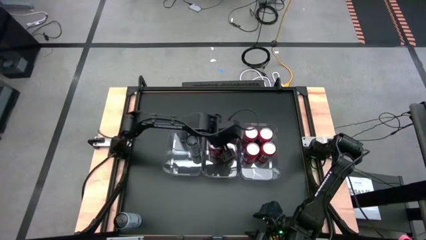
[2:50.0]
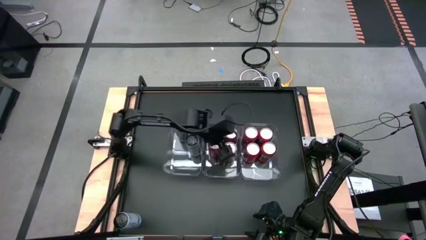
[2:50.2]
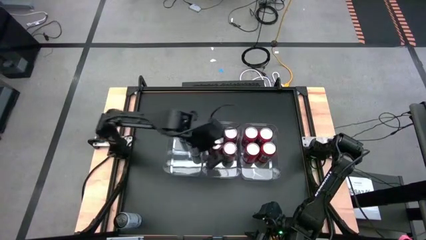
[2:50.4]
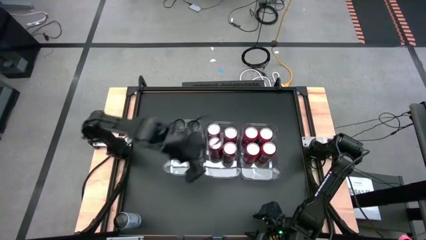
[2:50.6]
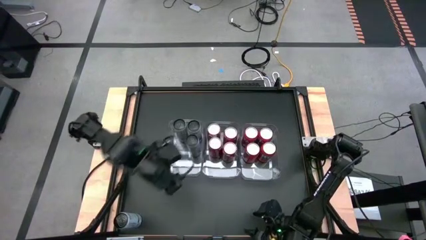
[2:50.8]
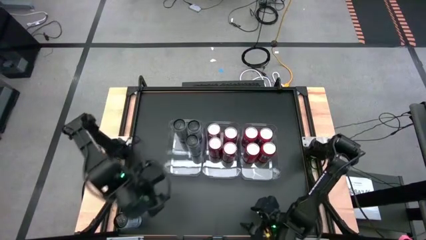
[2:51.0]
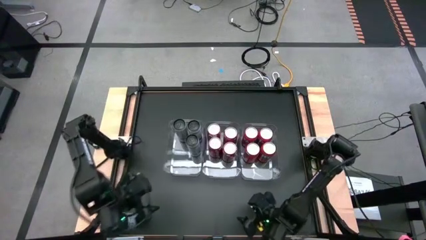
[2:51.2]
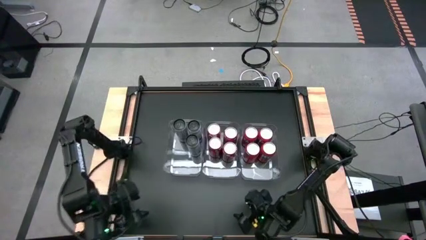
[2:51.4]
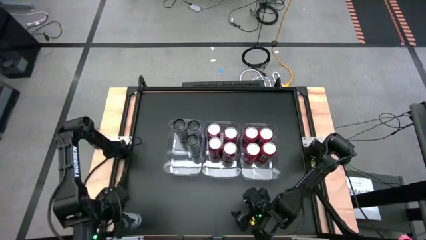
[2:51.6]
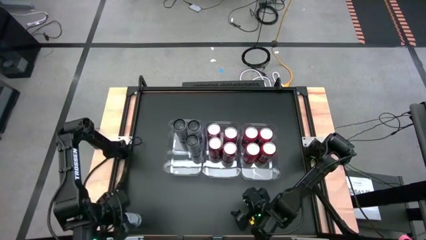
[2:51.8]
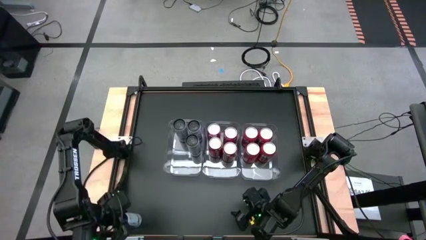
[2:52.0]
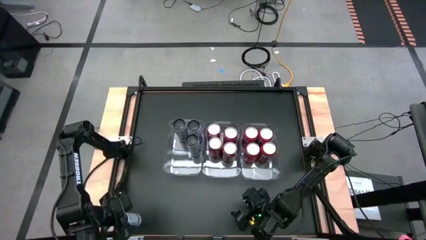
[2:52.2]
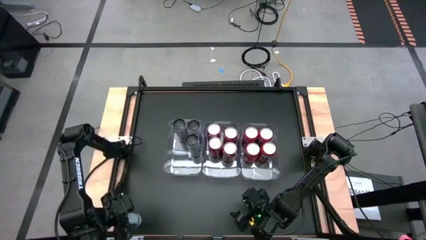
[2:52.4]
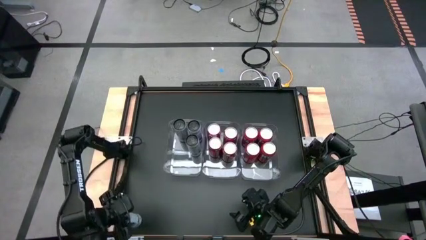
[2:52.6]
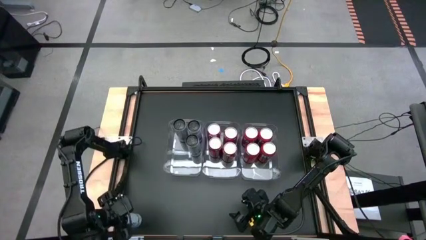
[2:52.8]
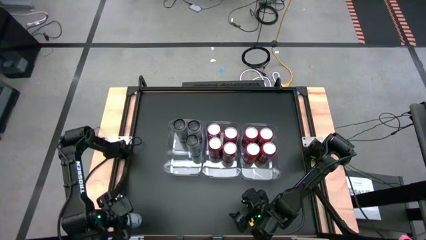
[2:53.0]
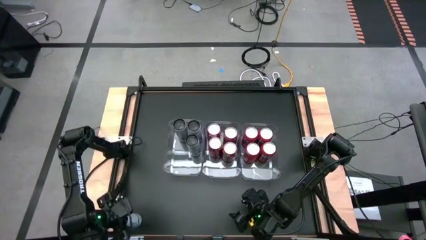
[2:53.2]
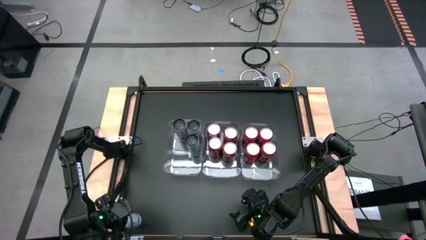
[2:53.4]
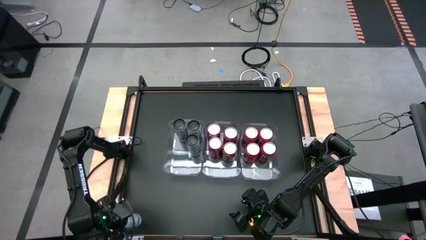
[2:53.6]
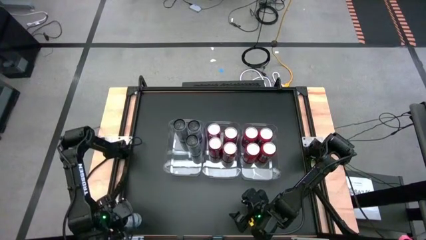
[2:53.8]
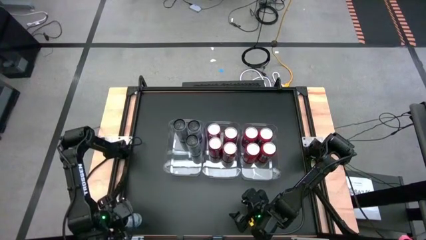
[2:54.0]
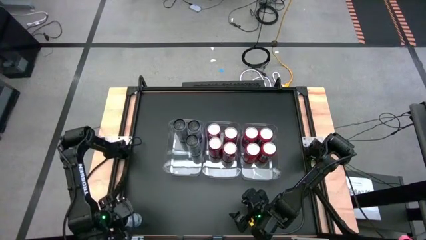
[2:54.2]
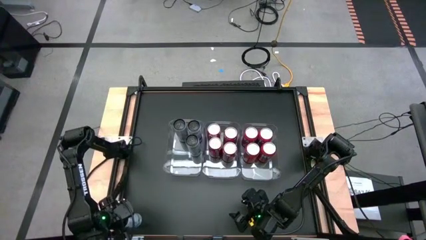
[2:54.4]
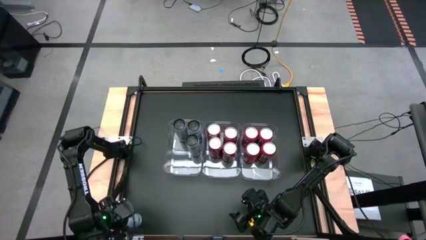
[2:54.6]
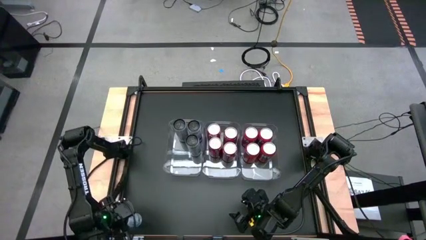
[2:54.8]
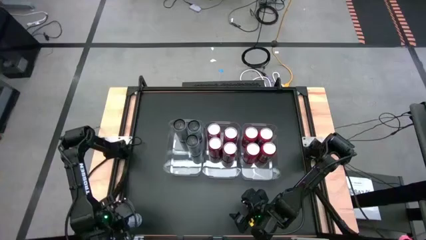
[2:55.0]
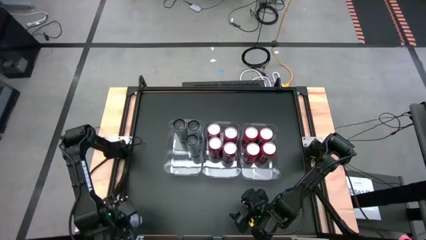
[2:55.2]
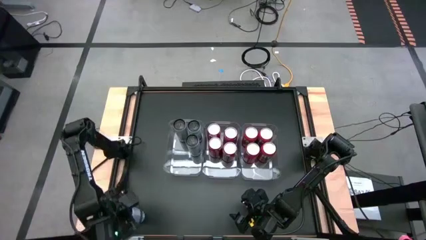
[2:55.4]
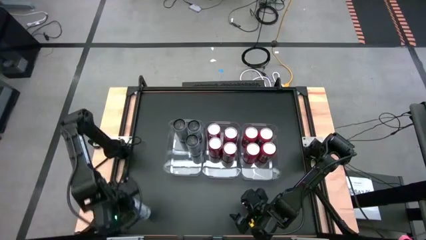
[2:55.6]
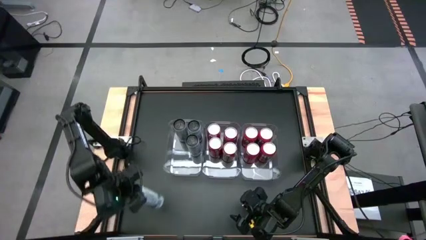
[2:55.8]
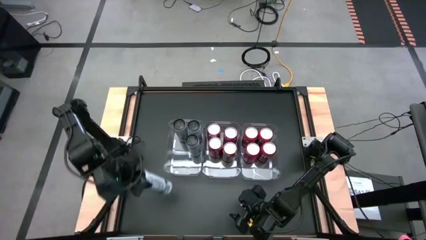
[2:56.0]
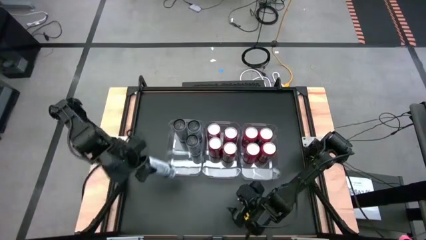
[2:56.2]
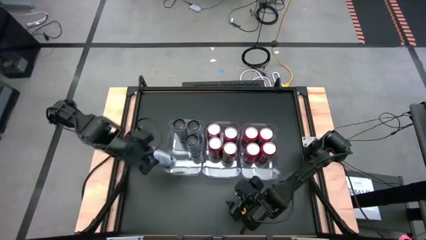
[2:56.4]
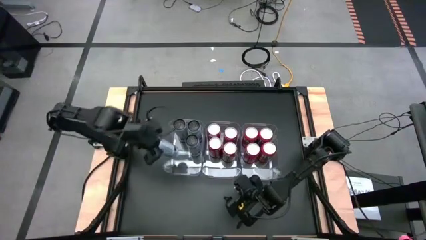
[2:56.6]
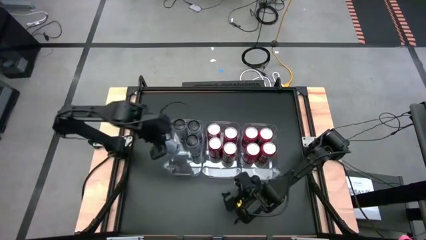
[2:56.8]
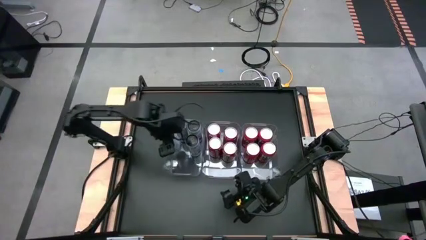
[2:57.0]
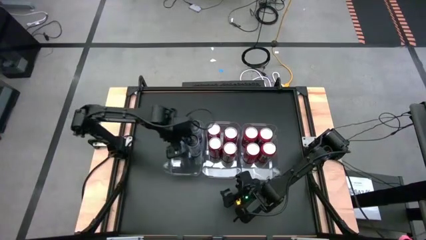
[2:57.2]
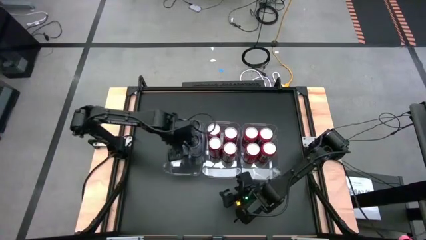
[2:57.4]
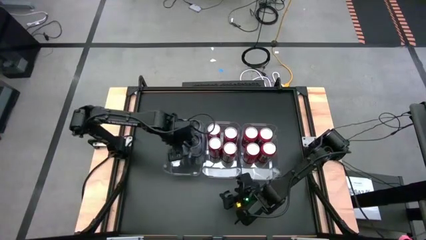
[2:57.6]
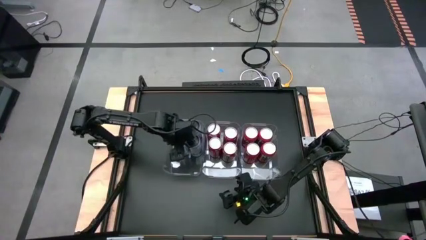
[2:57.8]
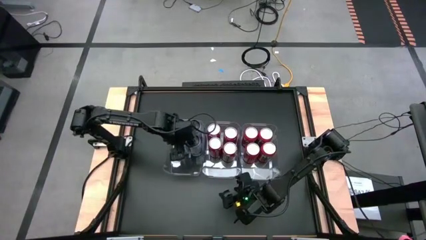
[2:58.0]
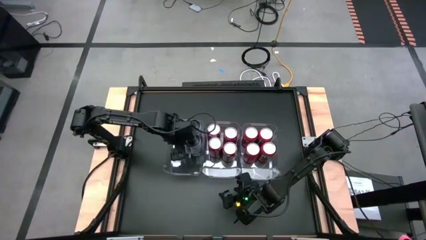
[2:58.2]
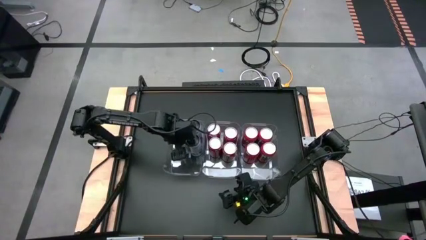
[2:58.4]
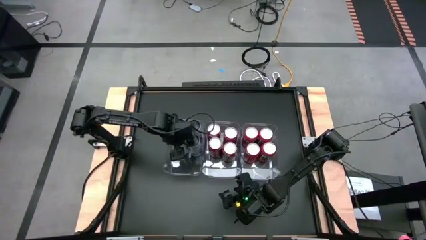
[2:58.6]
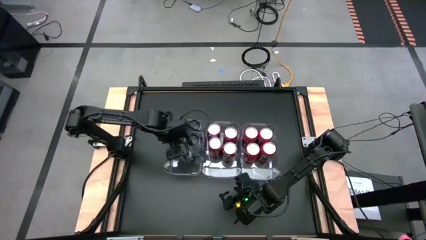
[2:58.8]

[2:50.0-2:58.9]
Task: Sort soda cans
Put the white-blue soda can into the left transparent bin

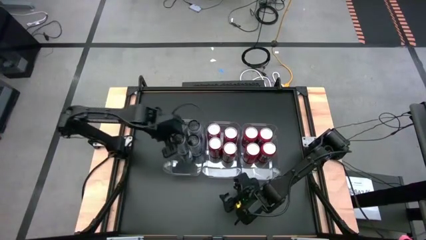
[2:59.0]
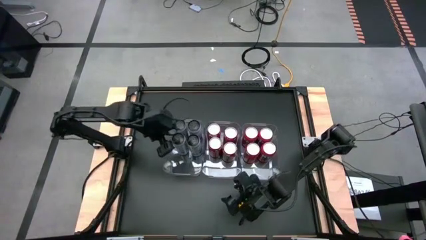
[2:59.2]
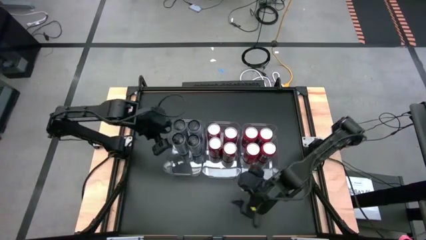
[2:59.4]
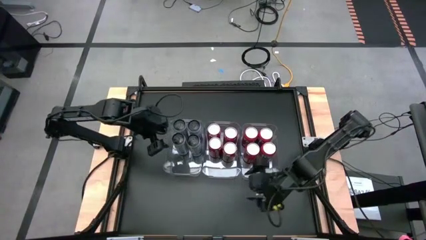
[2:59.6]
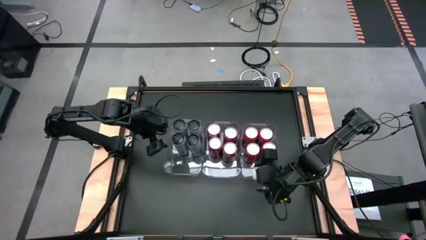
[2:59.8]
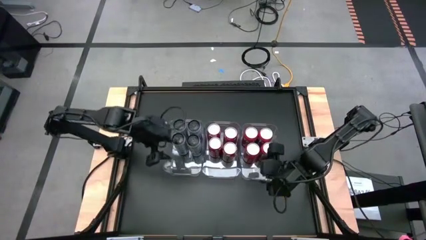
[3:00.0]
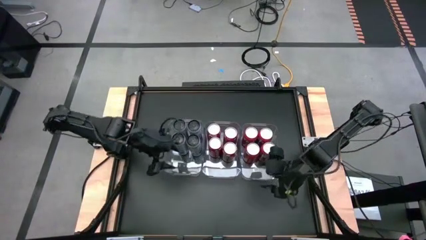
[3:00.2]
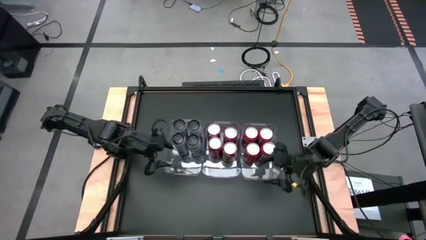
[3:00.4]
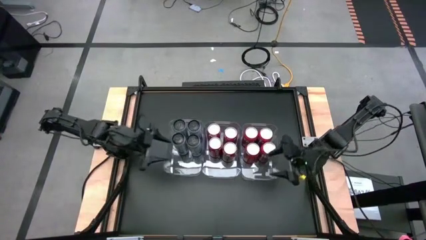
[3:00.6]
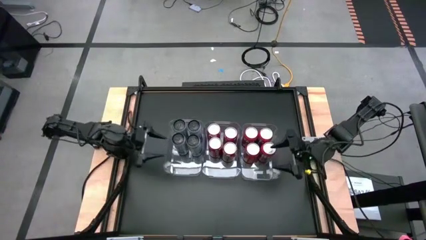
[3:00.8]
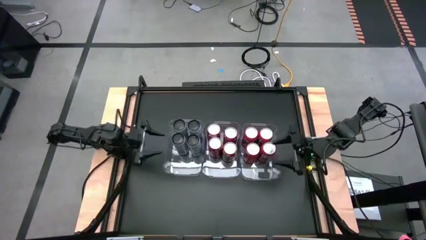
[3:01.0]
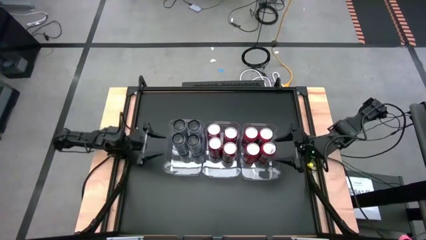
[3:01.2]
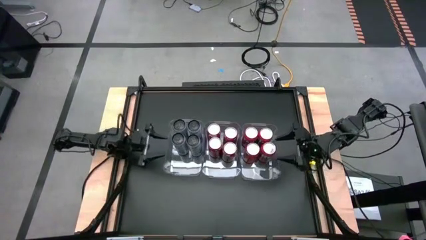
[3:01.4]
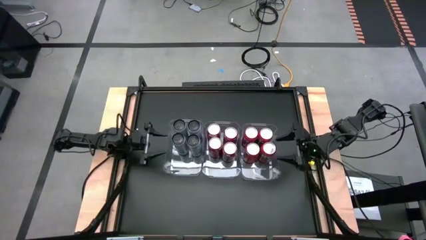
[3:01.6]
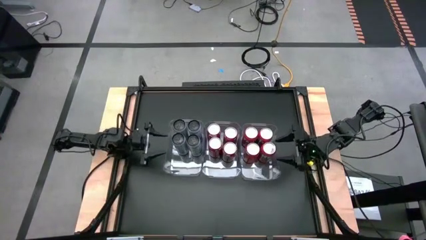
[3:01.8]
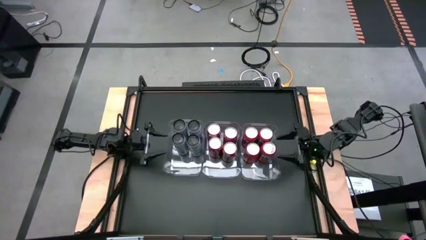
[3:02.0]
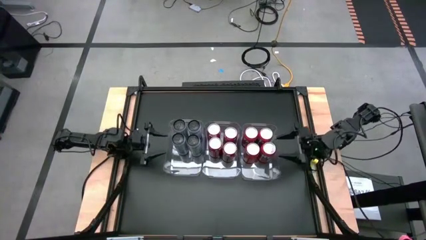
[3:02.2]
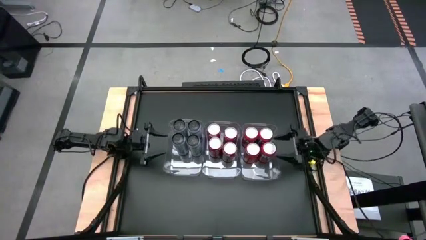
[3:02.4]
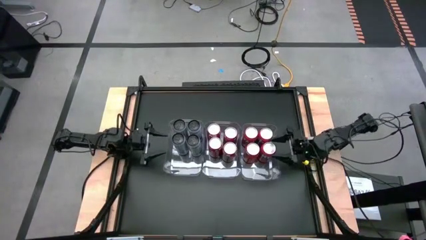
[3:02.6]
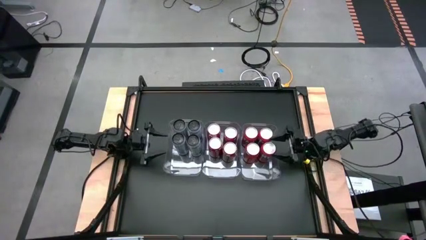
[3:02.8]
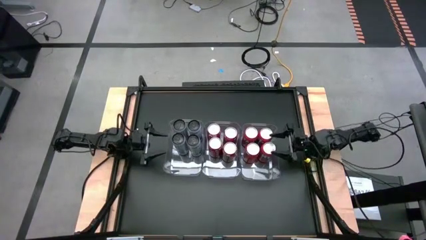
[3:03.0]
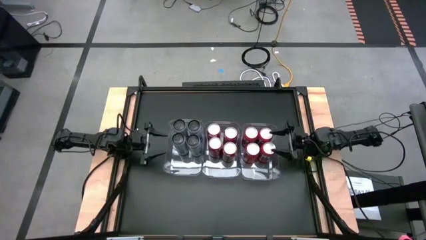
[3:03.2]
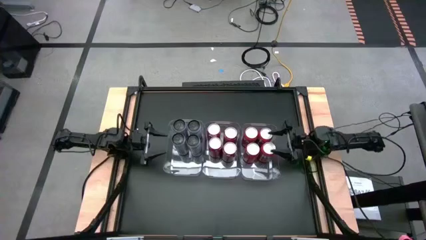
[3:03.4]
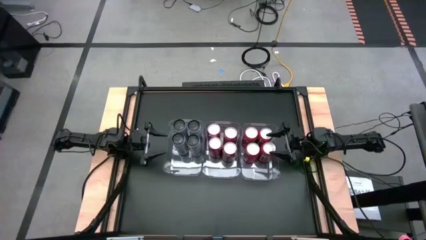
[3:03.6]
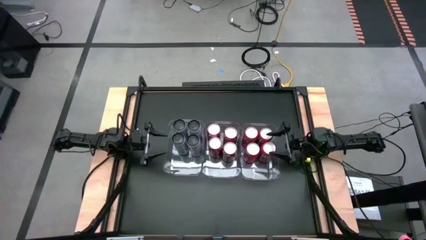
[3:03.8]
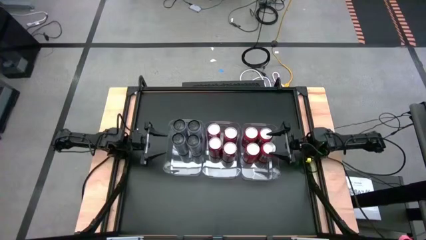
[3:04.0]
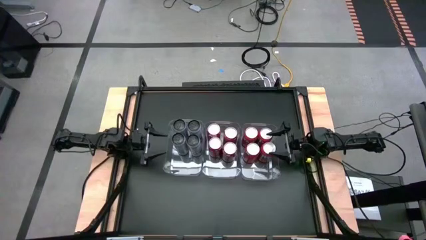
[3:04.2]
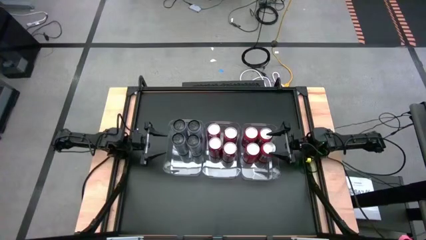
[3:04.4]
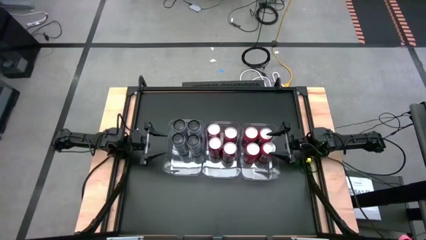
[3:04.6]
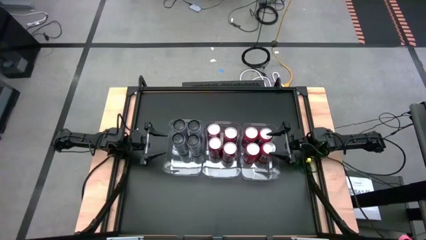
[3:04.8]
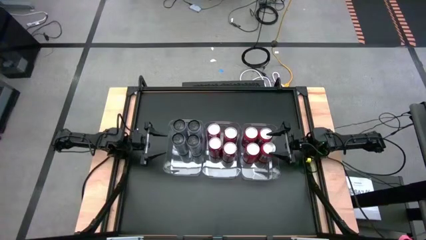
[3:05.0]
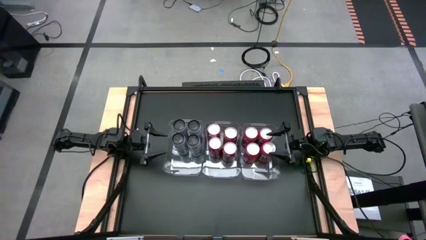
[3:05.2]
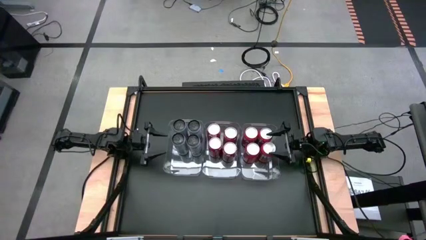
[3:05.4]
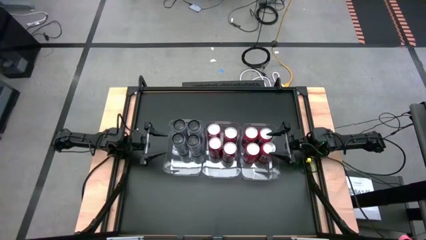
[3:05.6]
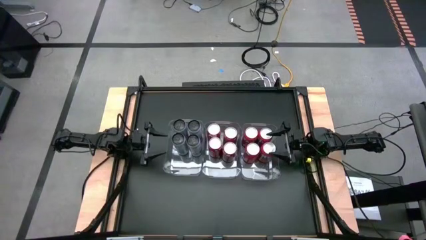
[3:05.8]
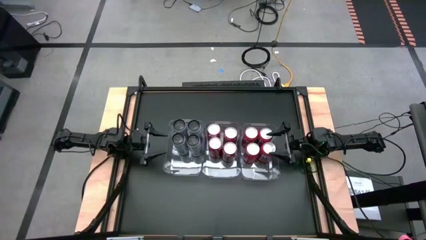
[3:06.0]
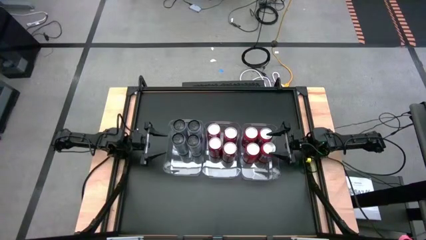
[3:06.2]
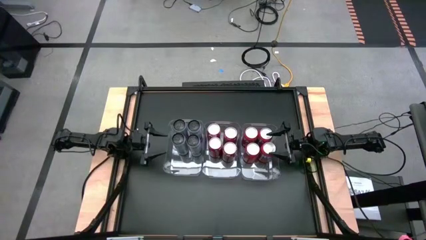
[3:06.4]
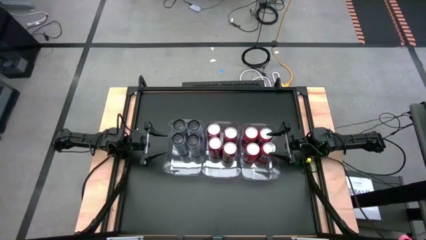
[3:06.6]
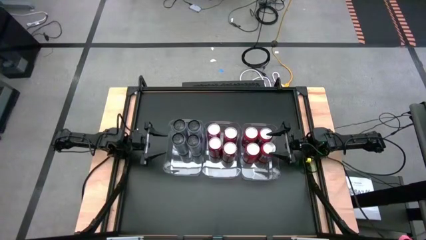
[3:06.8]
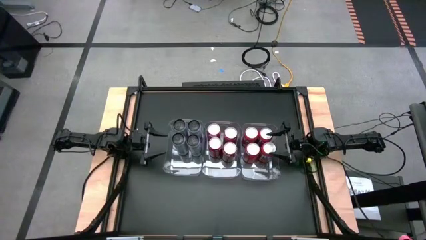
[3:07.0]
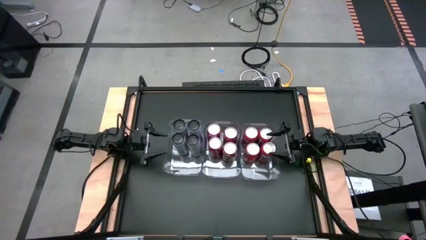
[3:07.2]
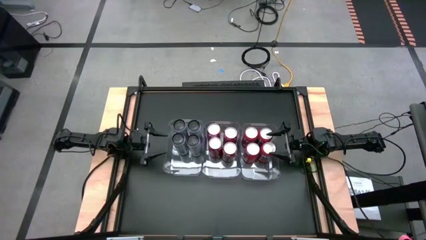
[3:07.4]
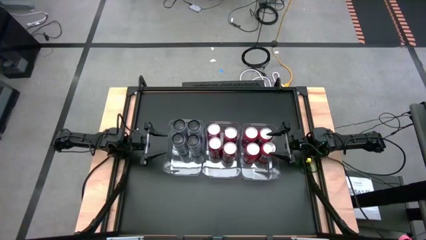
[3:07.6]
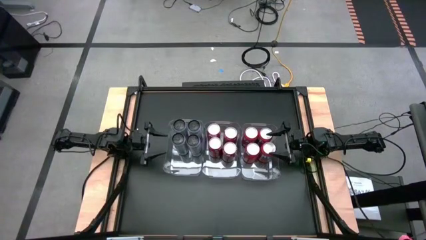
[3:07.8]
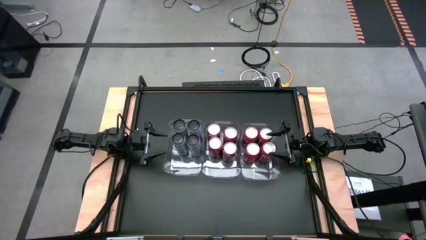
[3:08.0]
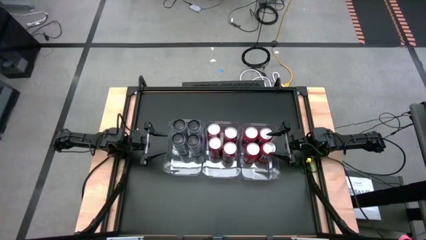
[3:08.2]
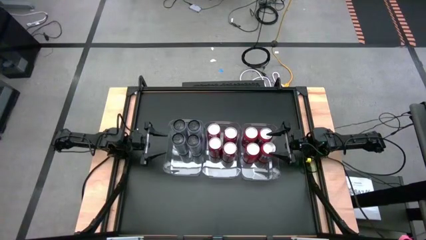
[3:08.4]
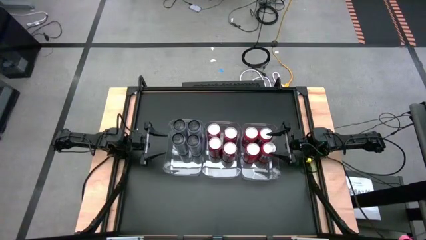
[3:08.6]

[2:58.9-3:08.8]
Return to Home Position
